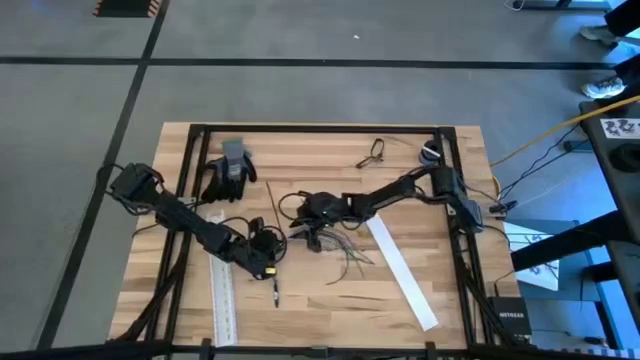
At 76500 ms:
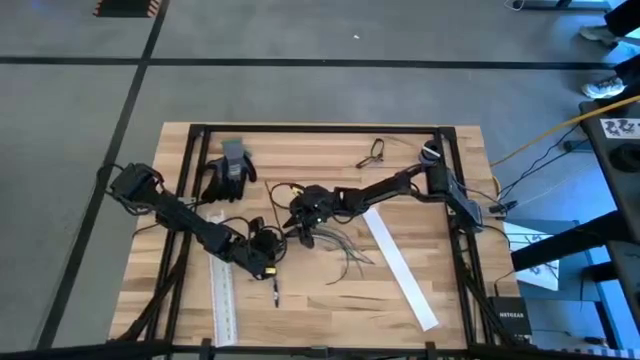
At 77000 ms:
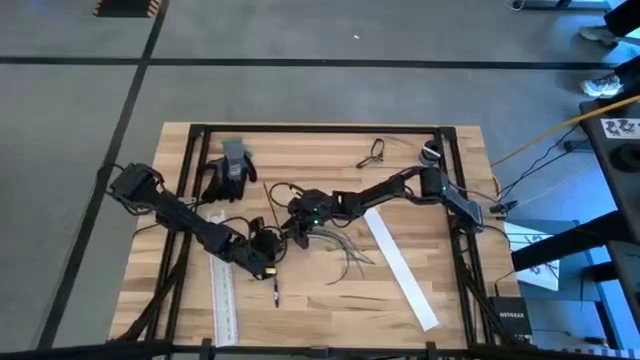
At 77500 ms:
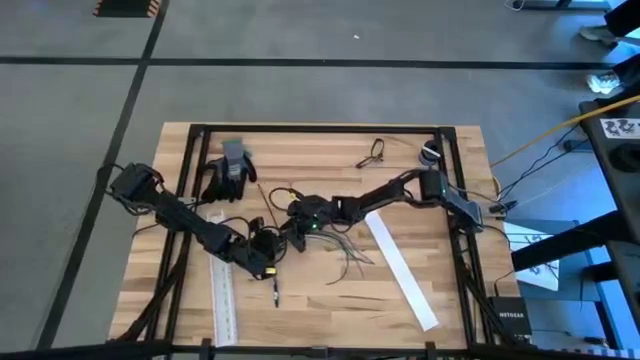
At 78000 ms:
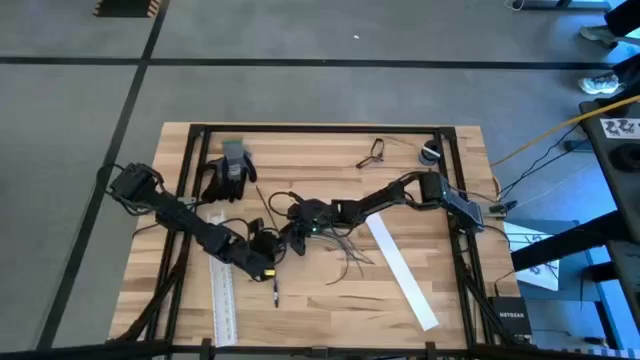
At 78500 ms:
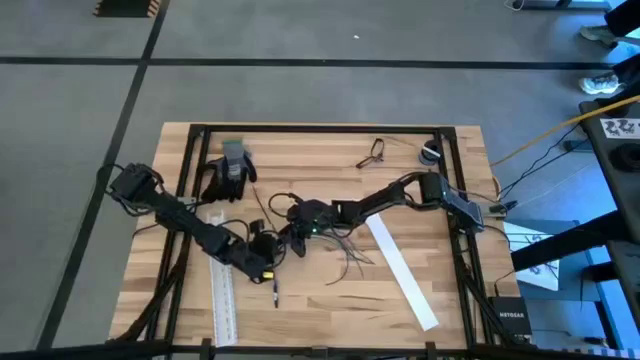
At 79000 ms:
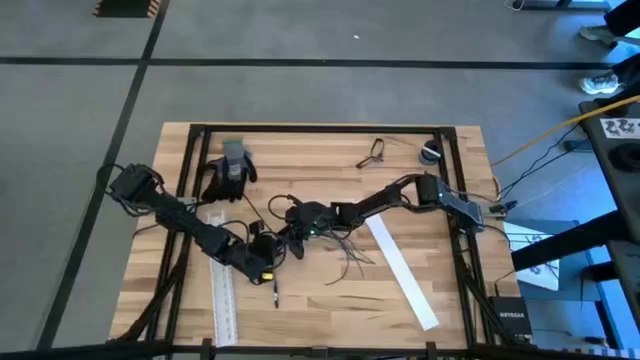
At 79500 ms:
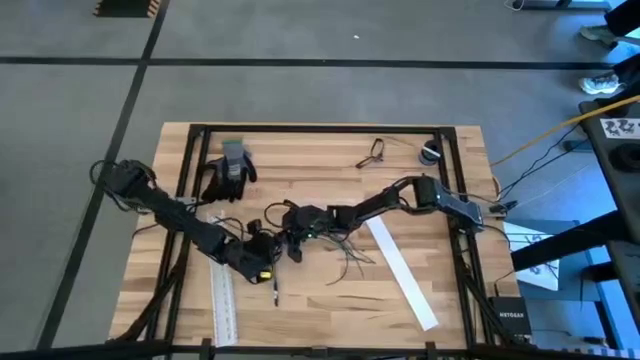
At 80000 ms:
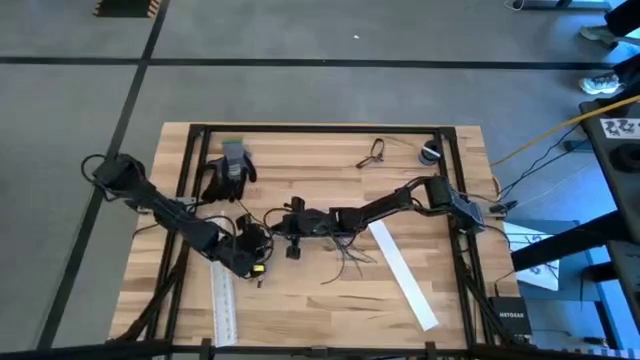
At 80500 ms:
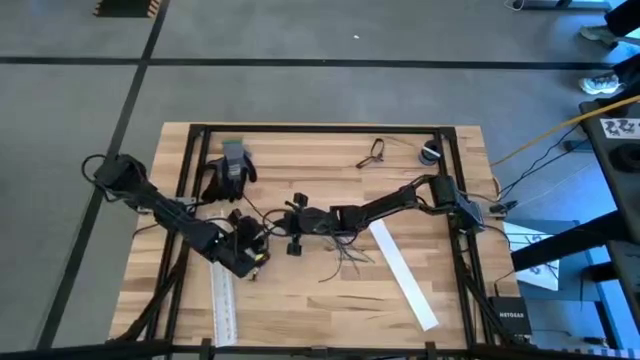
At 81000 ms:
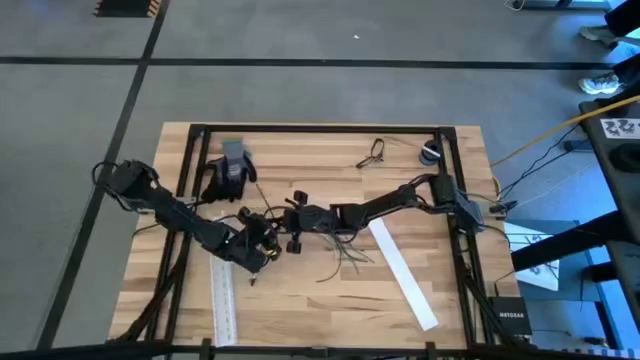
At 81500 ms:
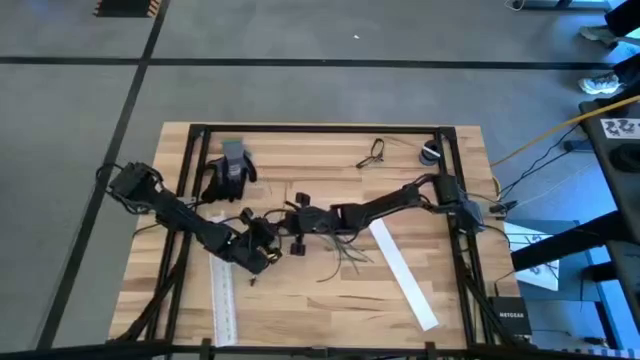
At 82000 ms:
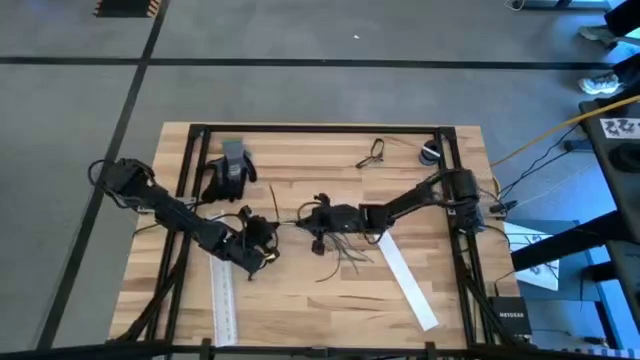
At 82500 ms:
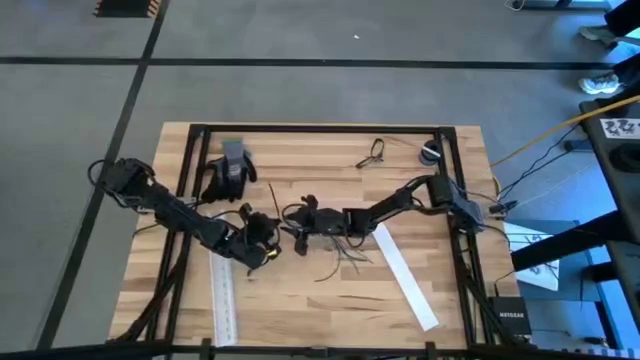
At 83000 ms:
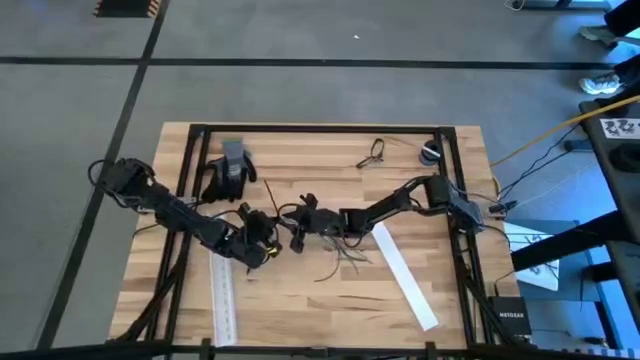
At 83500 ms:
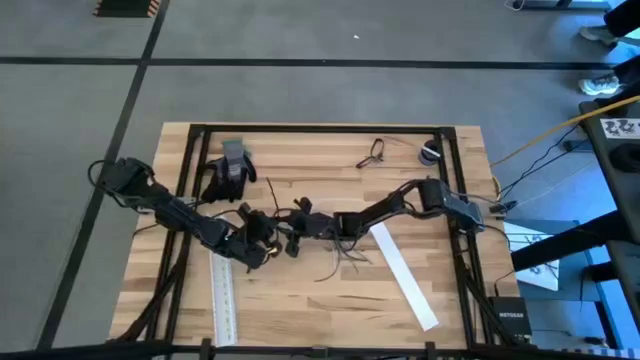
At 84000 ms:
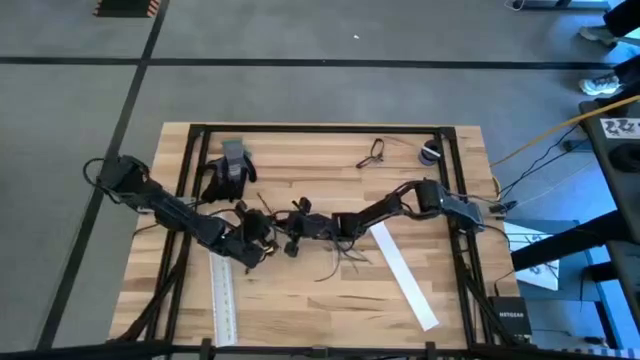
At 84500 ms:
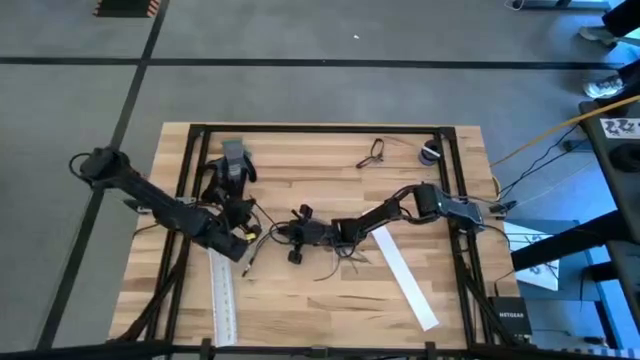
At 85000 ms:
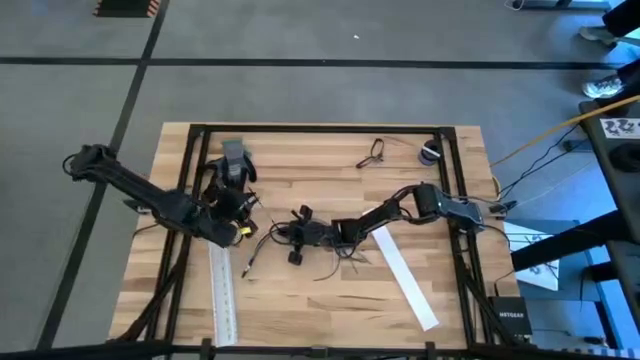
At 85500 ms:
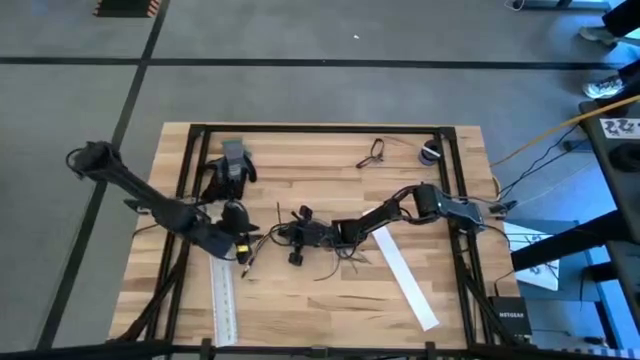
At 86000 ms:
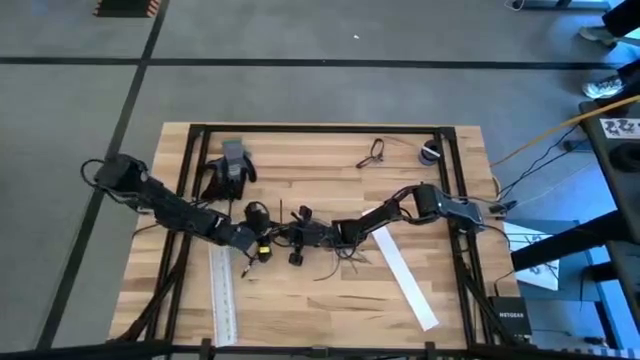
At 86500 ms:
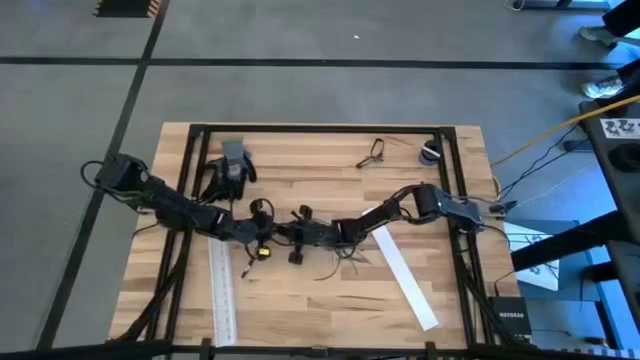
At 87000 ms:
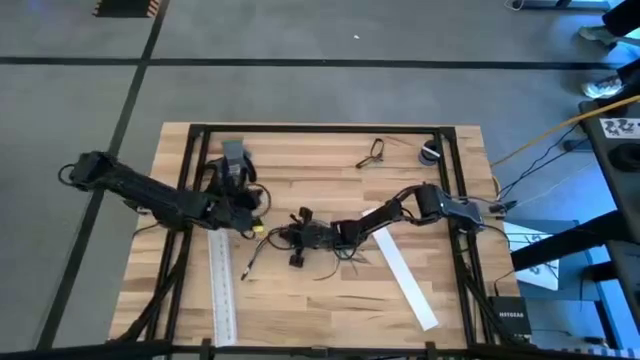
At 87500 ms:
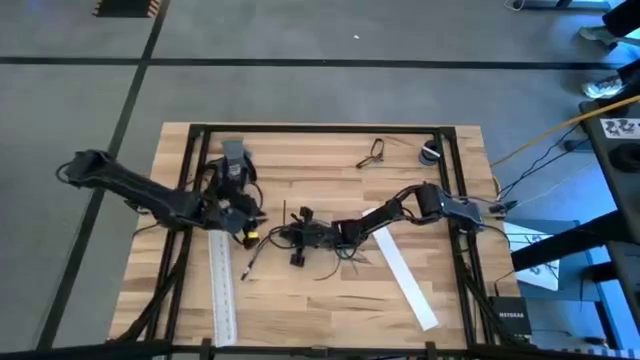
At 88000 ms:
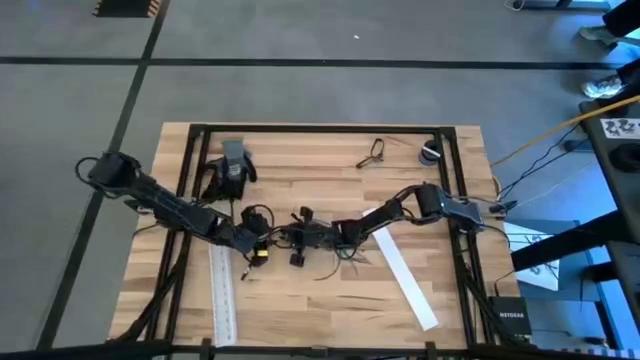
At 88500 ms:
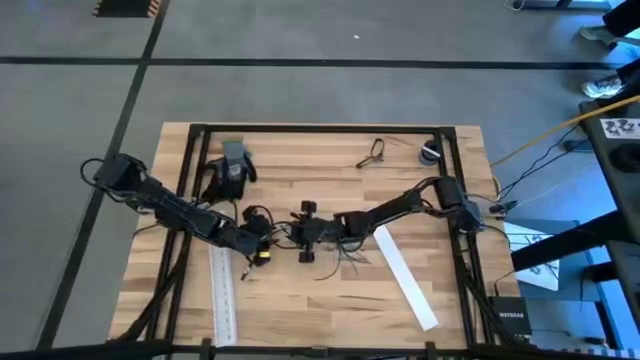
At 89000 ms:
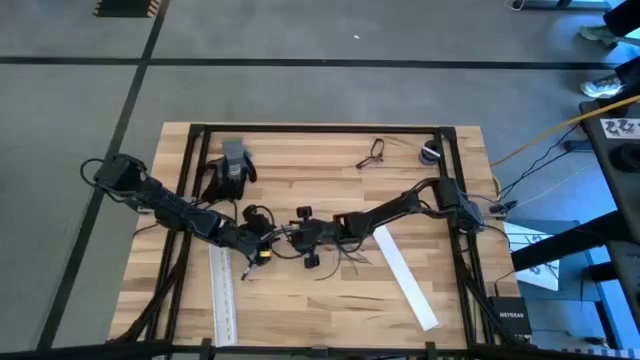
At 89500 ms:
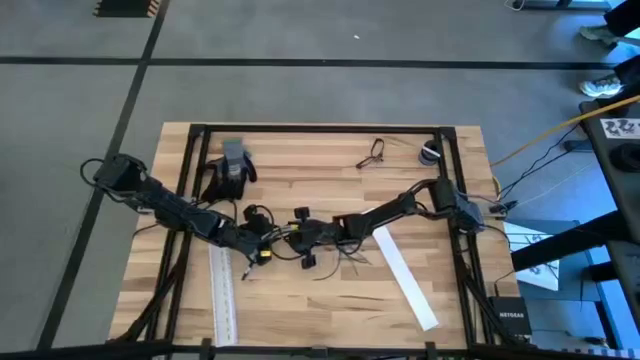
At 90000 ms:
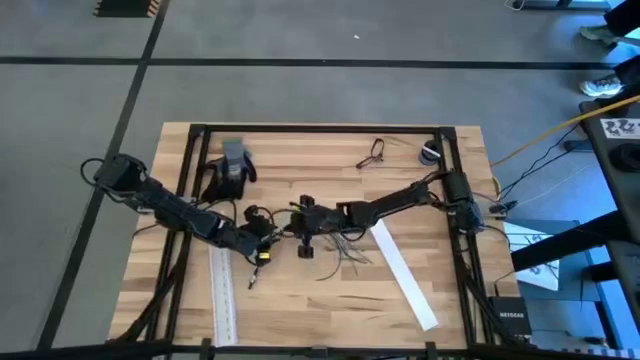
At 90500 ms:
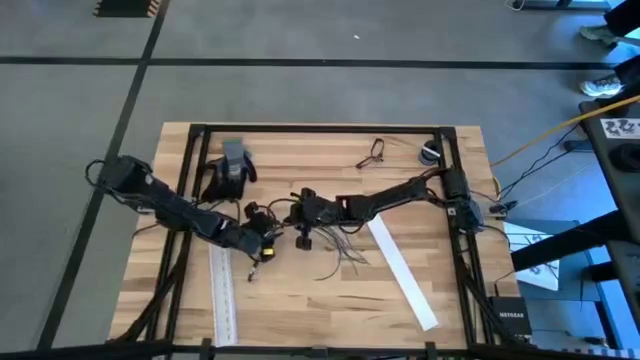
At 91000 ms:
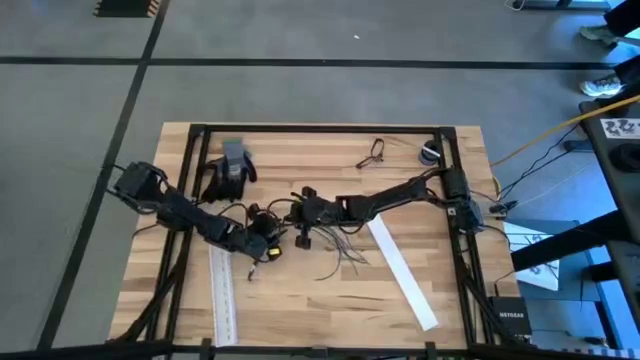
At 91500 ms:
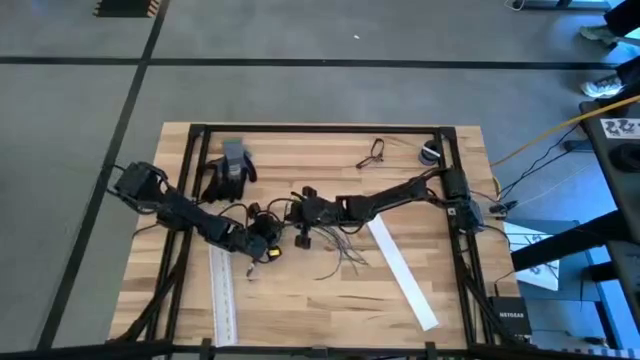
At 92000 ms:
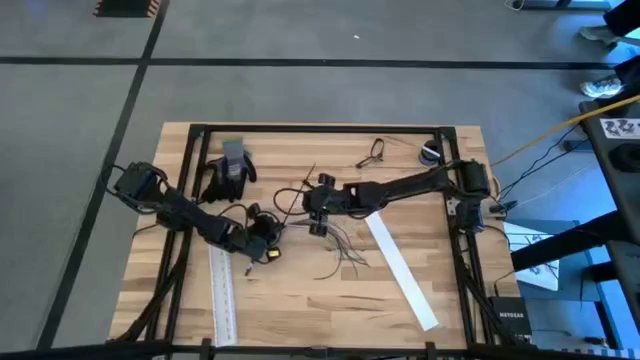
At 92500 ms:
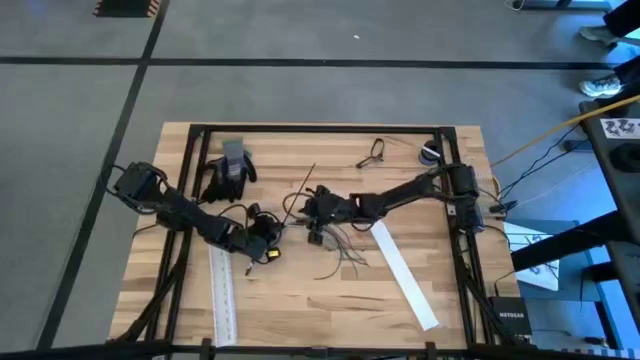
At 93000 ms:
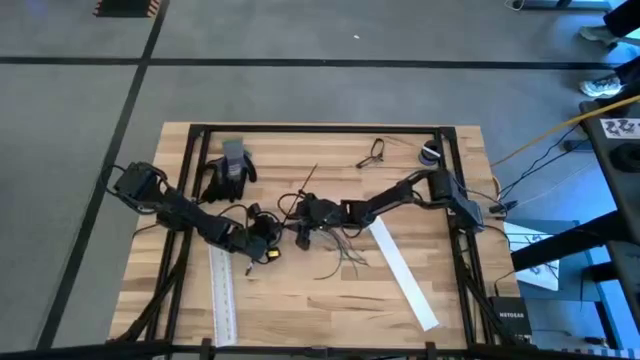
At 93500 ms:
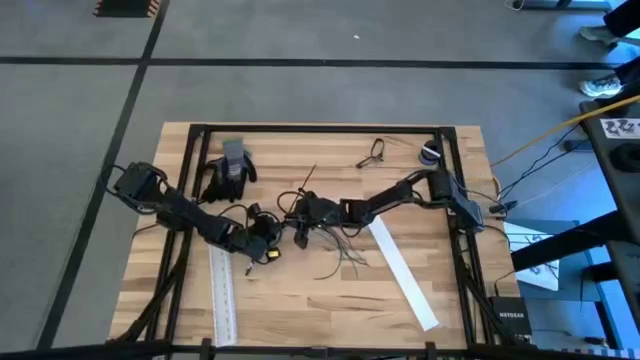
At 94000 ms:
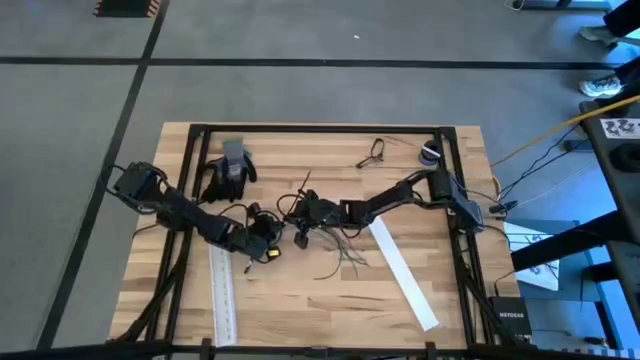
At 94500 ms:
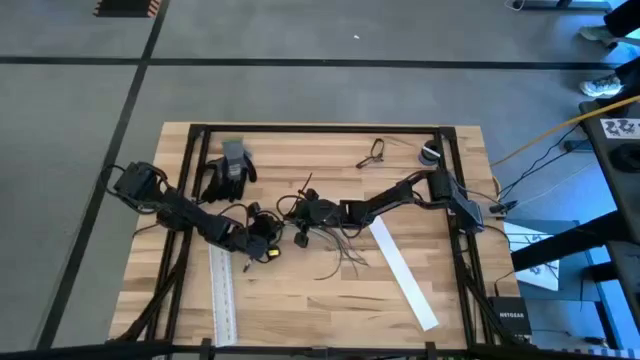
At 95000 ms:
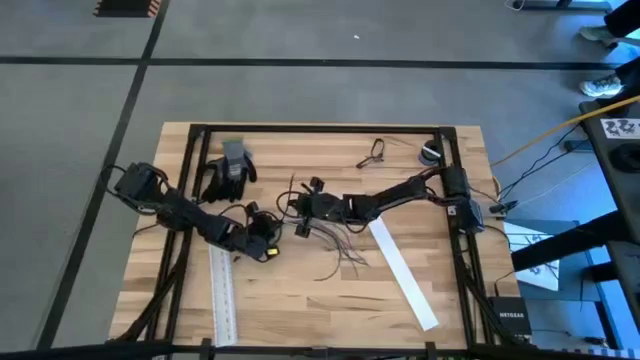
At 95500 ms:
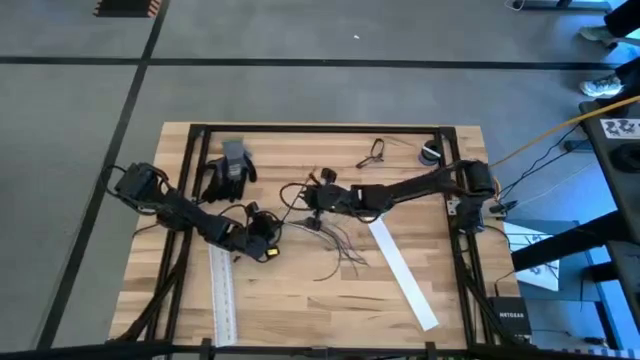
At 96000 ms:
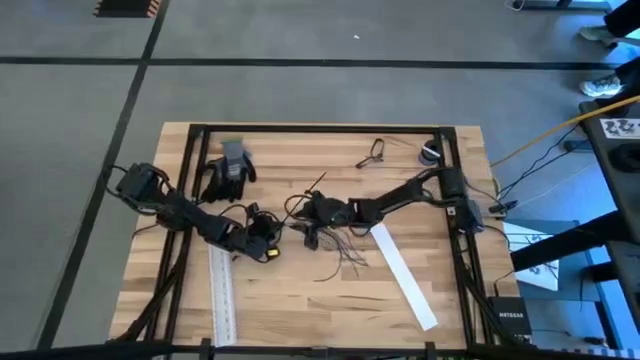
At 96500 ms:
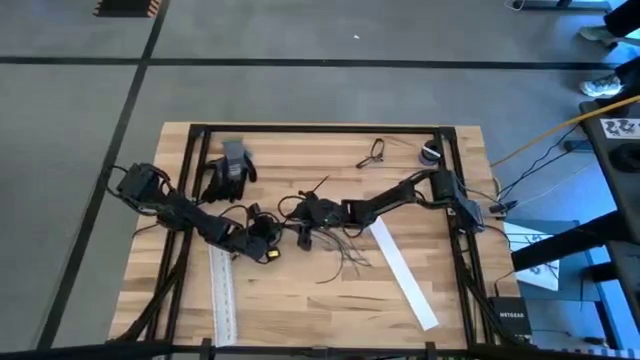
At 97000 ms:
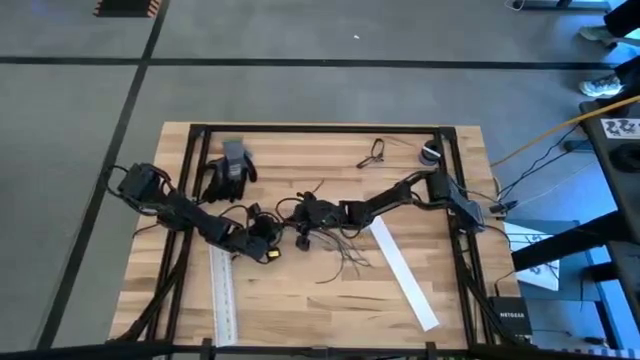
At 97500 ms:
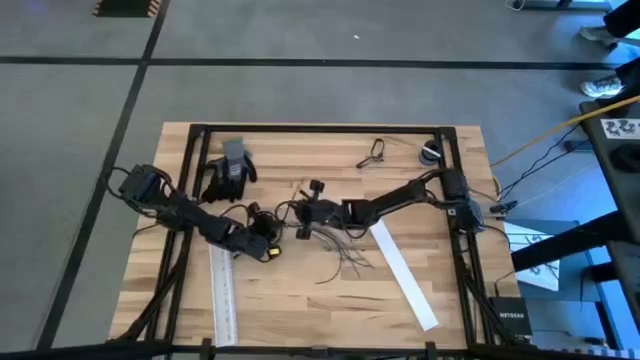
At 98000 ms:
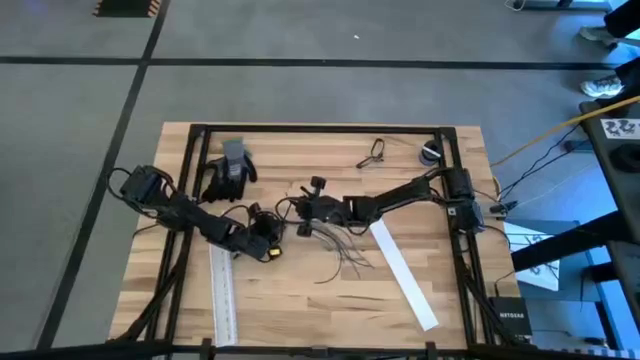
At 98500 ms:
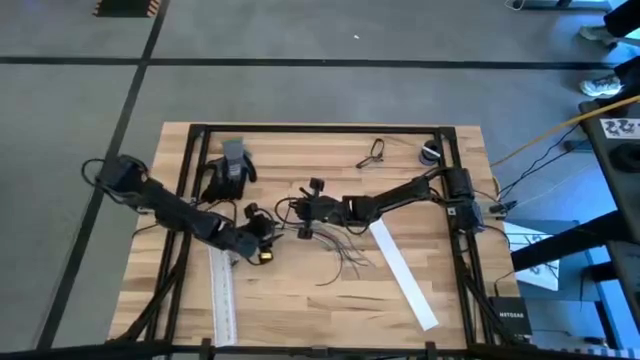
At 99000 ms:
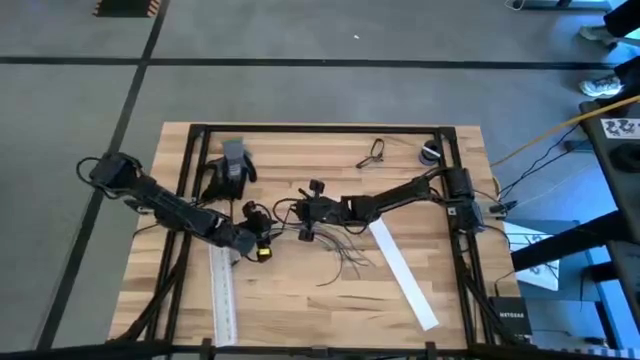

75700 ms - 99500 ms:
Task: Ziptie cables
Put the black zip tie on the cable wires
